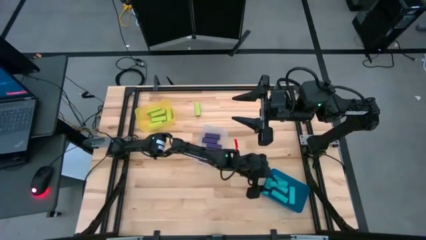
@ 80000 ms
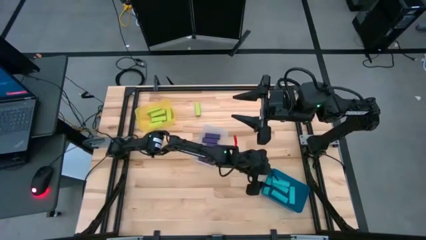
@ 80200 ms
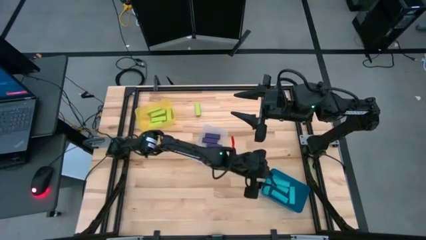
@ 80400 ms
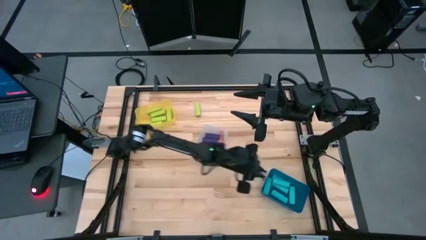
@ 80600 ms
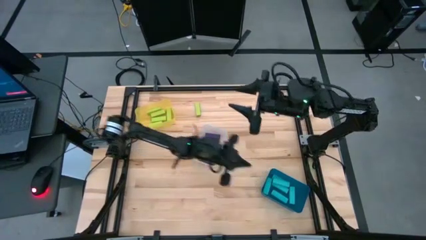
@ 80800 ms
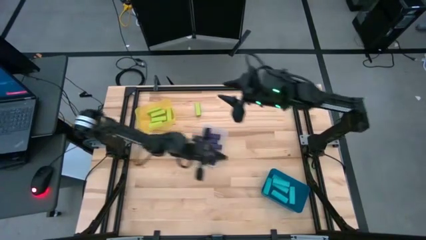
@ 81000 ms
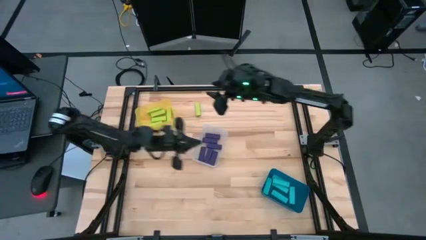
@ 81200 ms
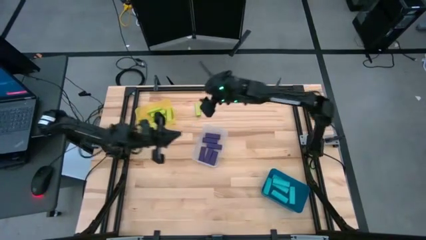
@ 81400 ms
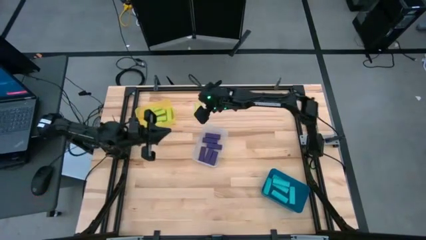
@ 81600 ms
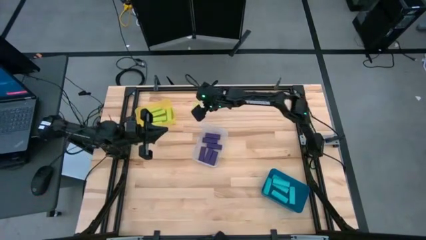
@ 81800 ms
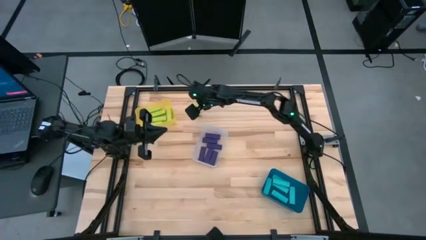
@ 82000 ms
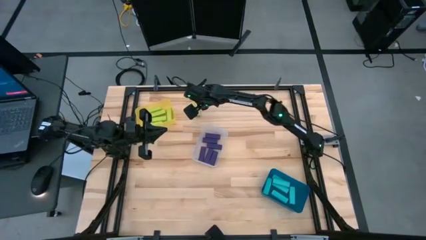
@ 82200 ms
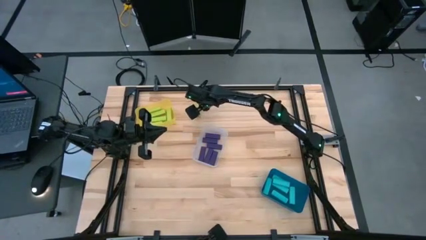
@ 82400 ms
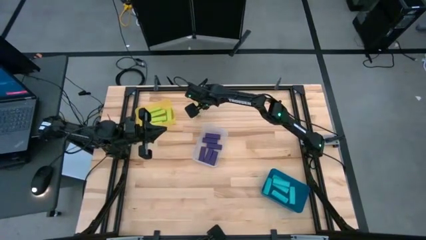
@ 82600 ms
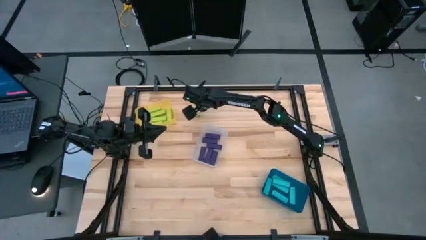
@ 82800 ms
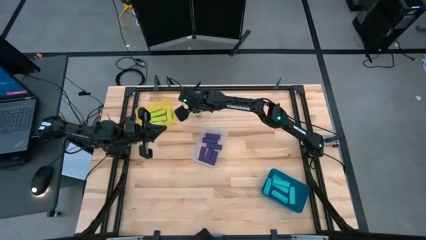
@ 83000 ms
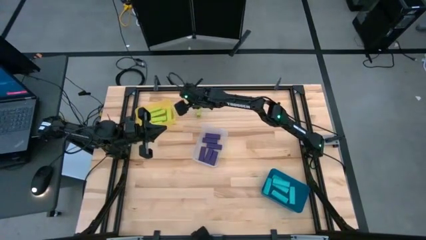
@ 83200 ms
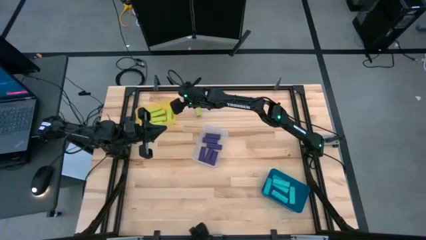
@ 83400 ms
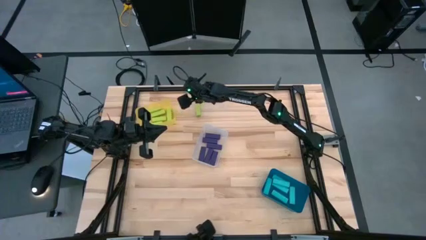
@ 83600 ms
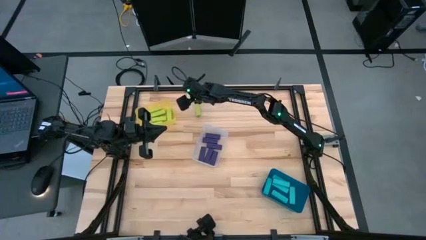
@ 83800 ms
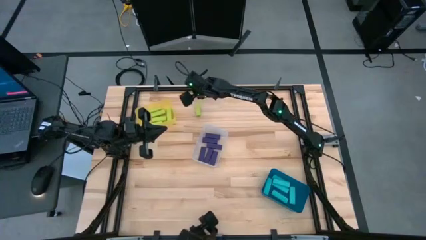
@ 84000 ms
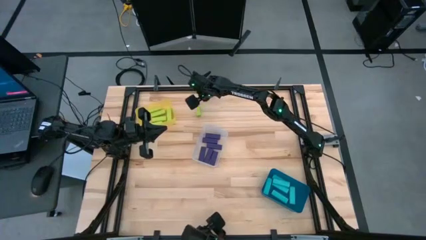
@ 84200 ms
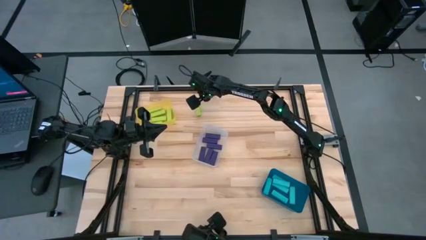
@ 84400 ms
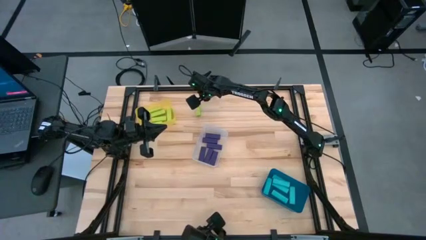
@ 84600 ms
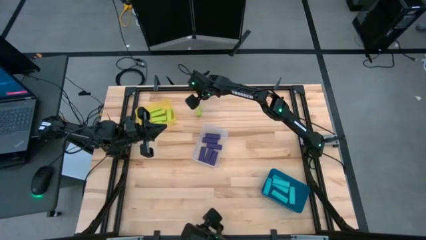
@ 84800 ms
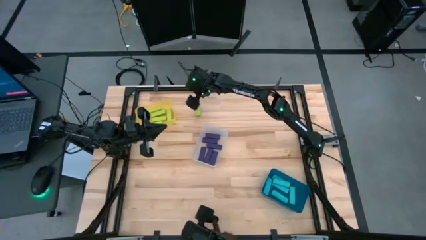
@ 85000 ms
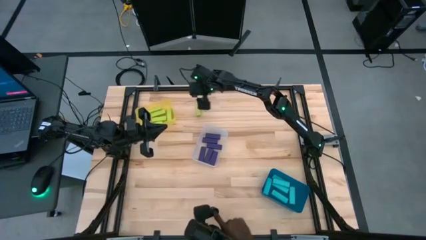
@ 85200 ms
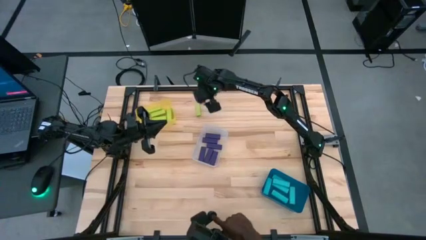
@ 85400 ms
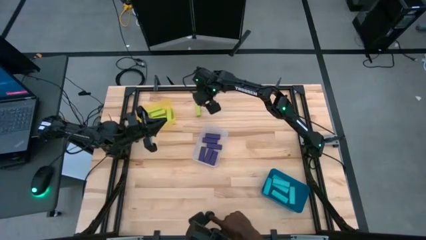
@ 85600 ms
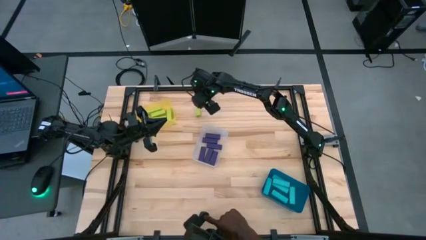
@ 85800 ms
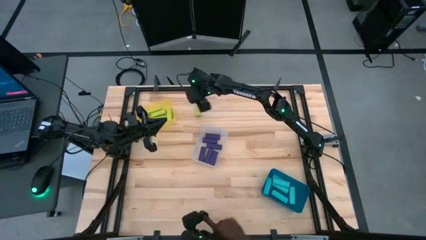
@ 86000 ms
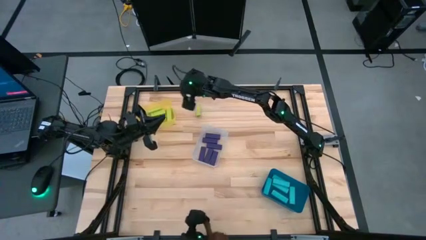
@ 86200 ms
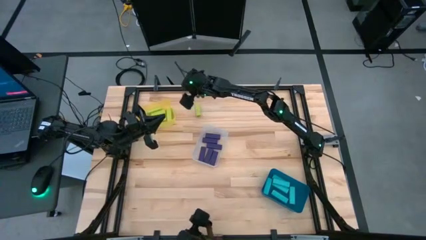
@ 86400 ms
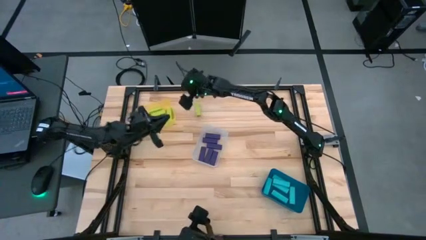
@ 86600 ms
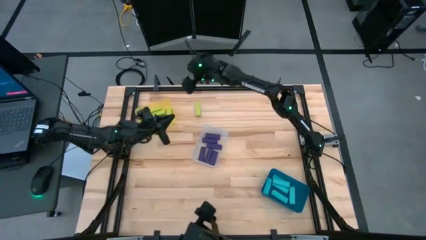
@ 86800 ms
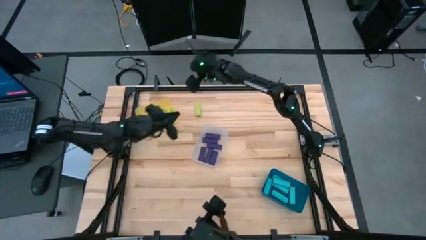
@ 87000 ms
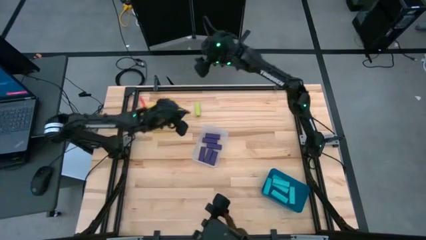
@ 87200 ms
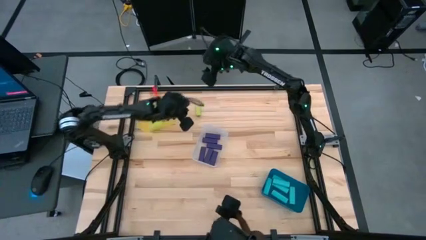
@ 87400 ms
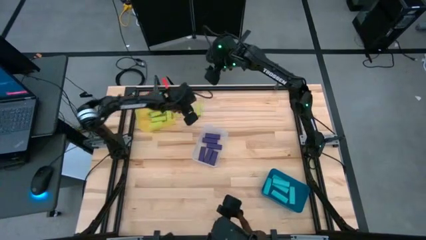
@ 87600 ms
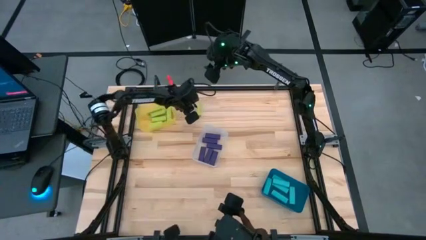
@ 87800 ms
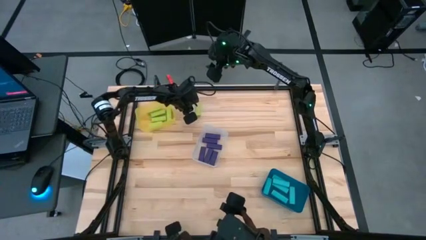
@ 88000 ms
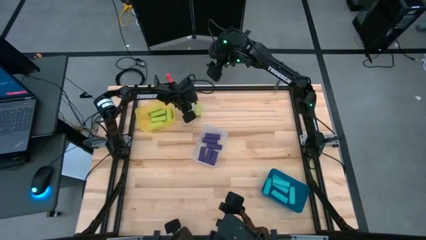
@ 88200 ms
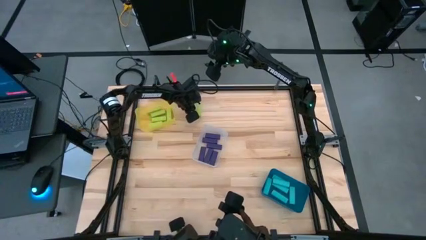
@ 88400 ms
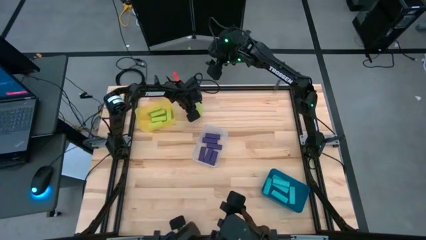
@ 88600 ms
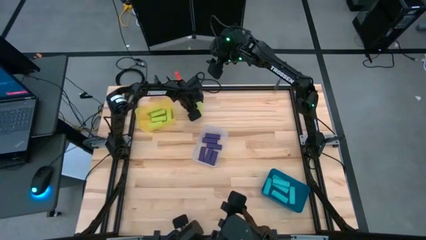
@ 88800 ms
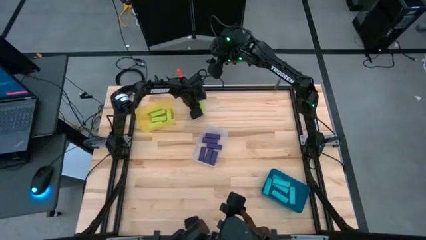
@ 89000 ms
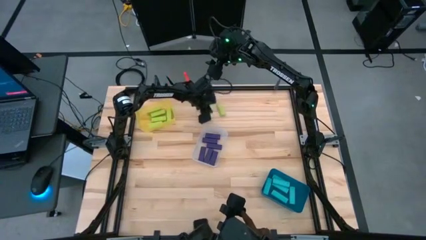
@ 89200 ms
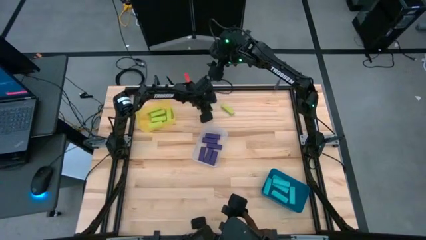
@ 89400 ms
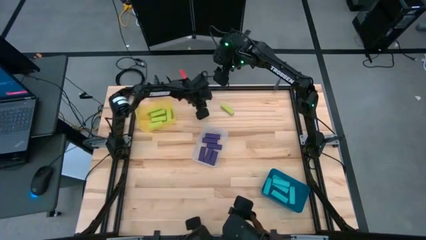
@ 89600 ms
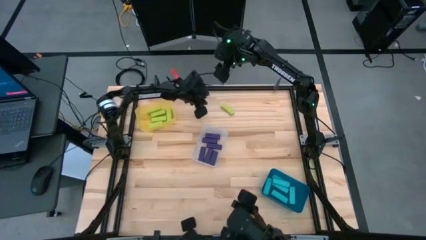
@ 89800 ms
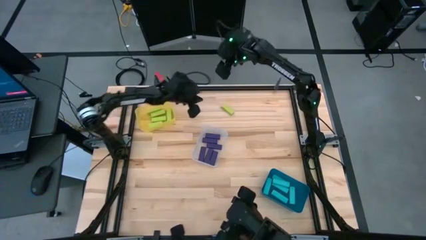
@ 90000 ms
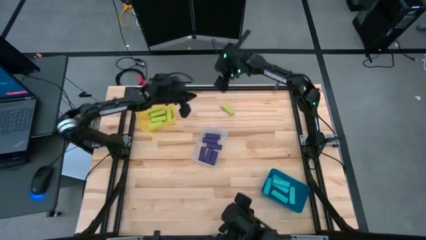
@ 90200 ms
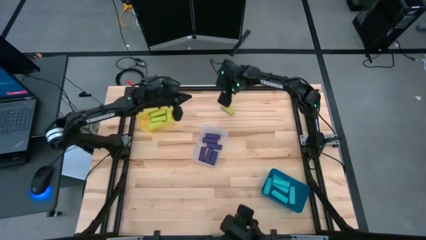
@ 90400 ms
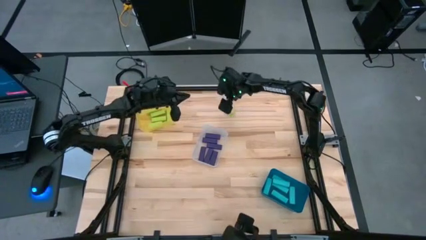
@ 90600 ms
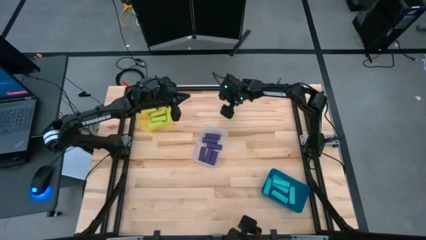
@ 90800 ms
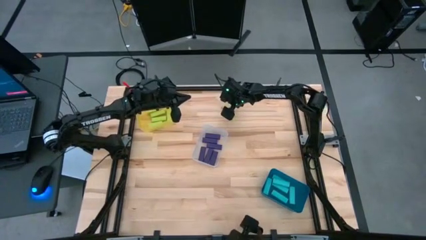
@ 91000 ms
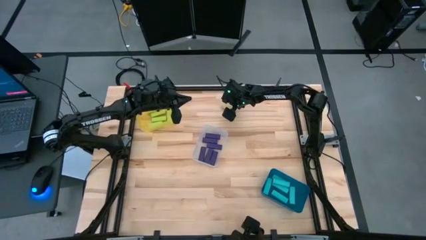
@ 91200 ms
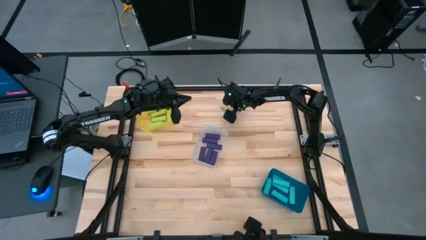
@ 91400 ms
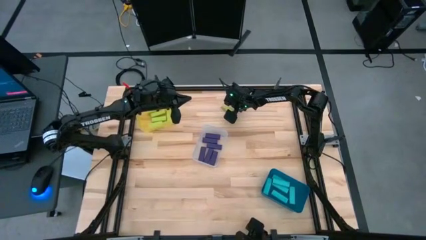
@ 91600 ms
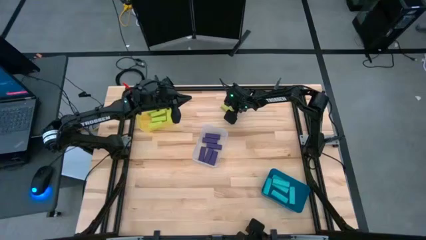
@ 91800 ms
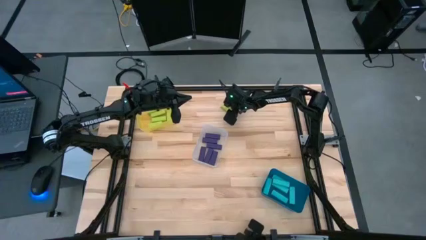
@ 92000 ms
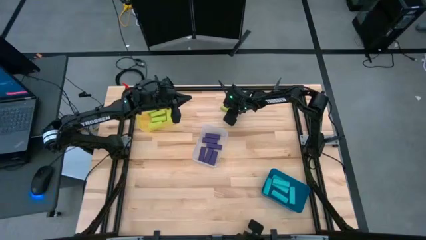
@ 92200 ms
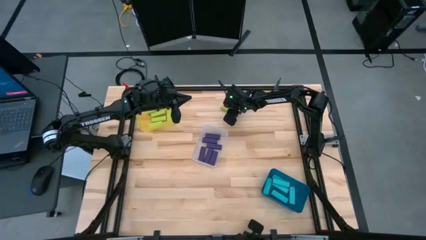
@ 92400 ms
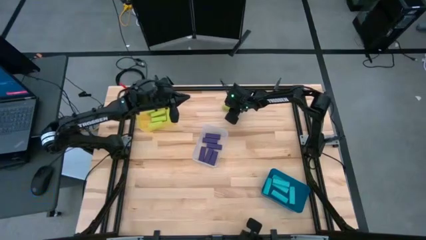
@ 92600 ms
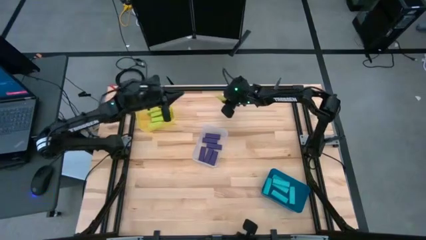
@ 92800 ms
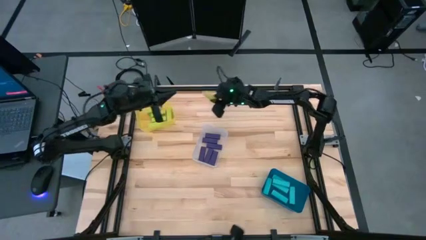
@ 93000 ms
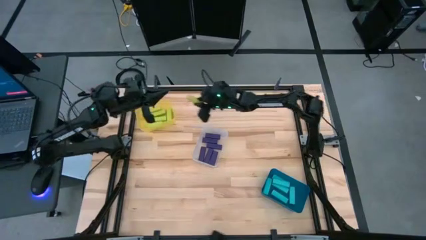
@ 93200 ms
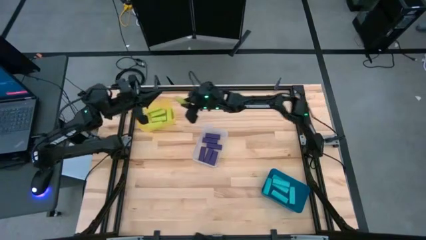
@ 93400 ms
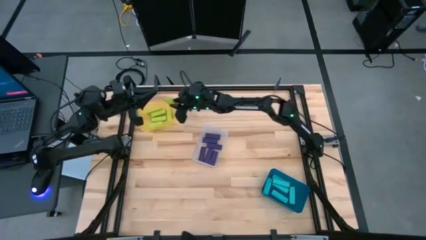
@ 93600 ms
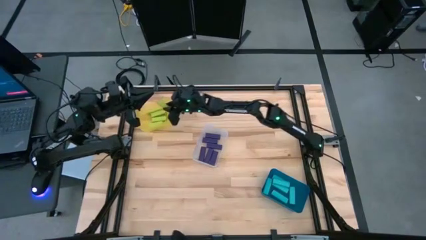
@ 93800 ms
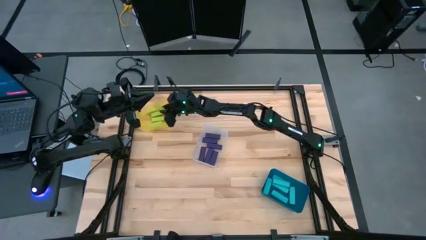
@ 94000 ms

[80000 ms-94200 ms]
Task: Sort blocks
Put the green block into the yellow bin
